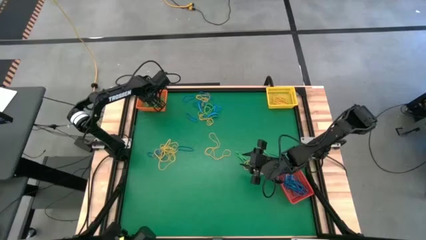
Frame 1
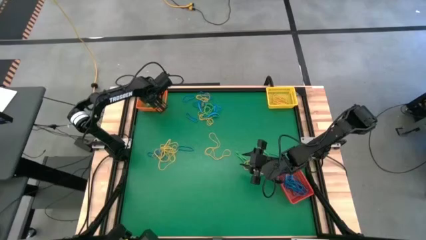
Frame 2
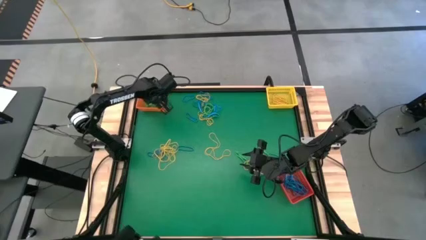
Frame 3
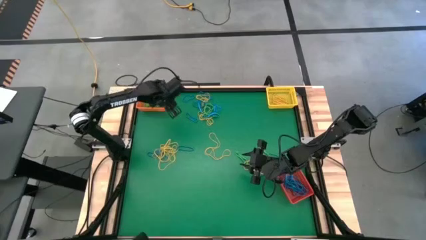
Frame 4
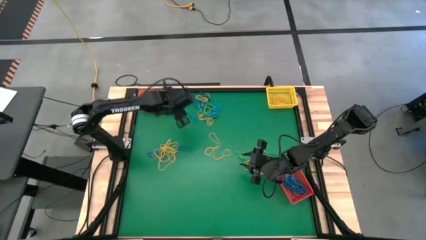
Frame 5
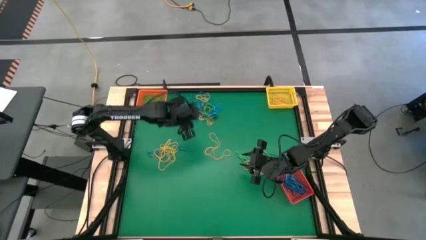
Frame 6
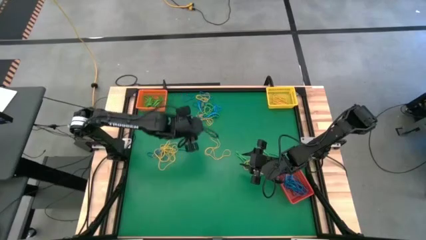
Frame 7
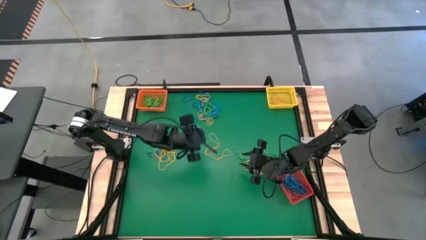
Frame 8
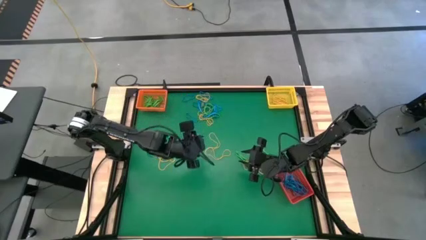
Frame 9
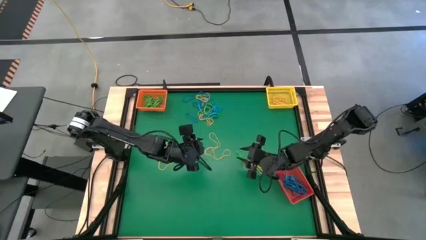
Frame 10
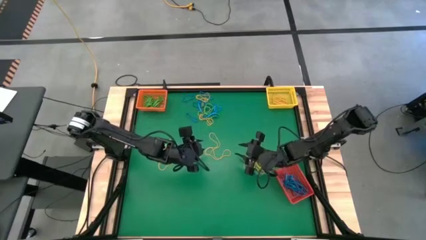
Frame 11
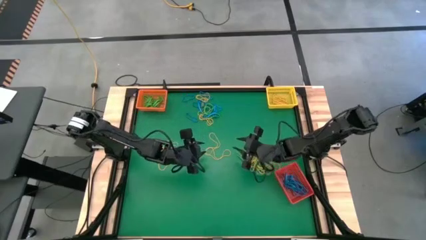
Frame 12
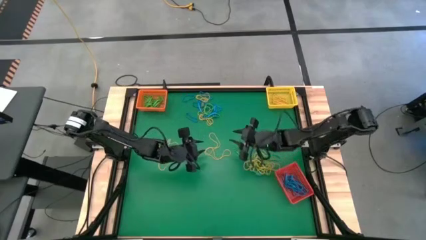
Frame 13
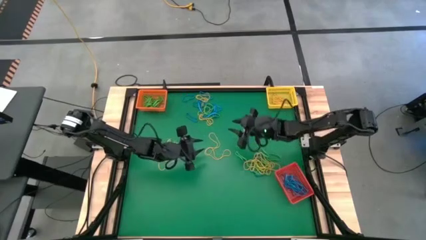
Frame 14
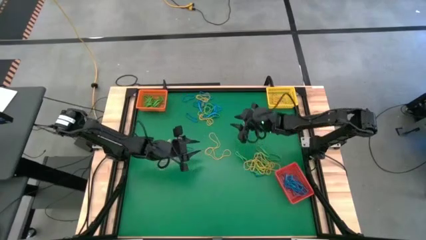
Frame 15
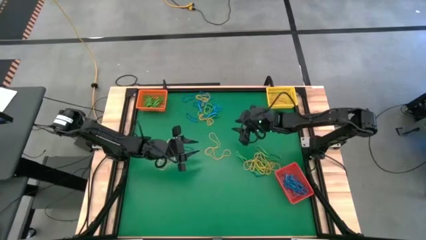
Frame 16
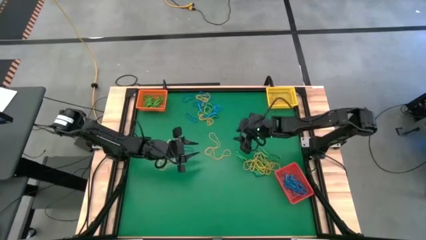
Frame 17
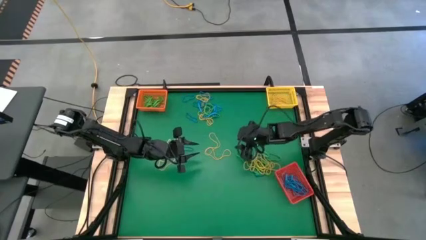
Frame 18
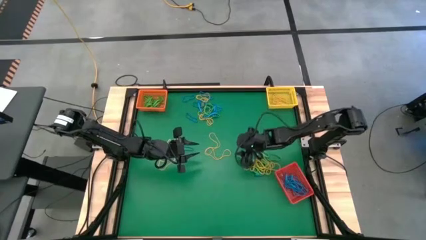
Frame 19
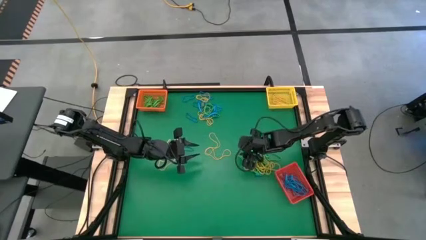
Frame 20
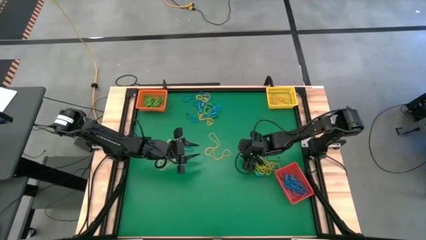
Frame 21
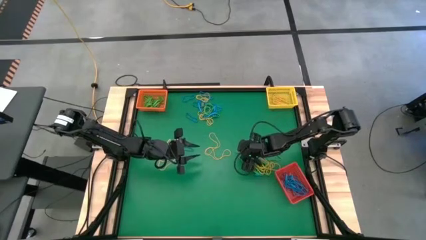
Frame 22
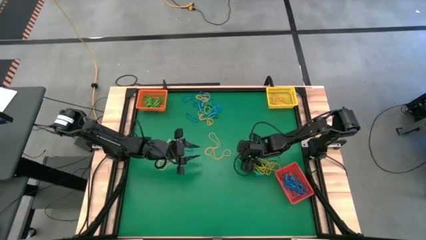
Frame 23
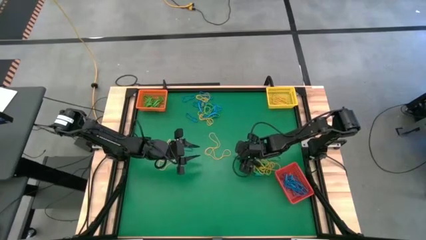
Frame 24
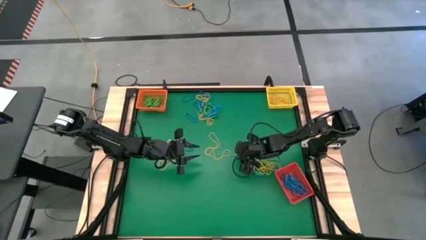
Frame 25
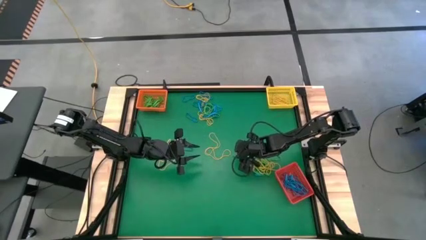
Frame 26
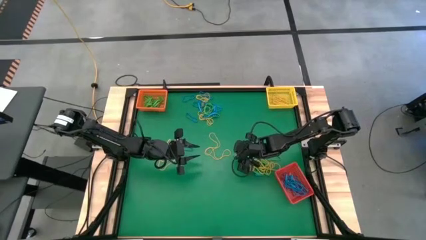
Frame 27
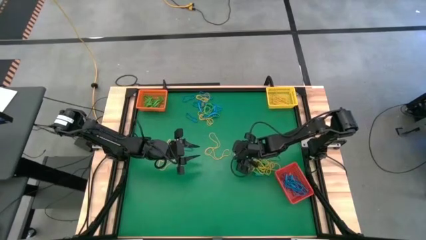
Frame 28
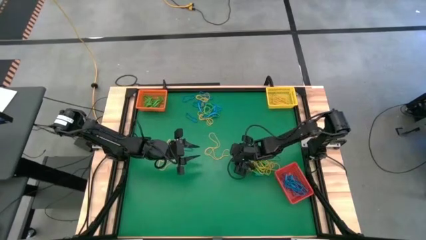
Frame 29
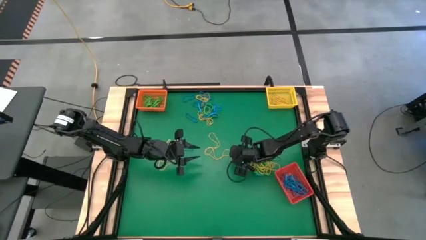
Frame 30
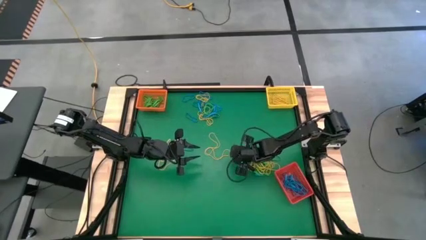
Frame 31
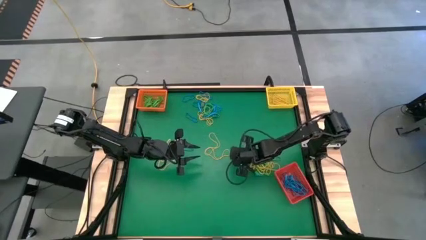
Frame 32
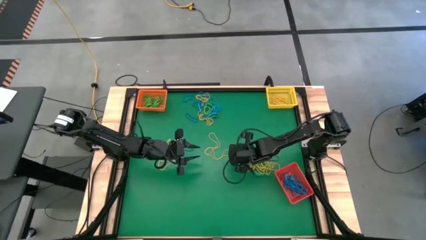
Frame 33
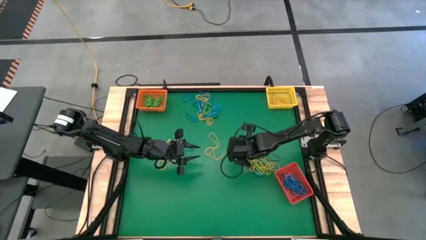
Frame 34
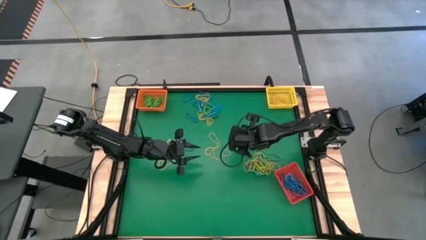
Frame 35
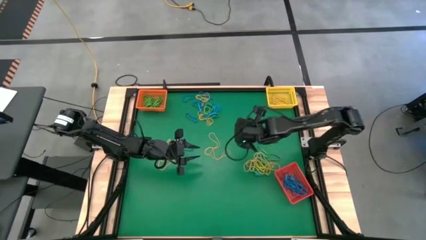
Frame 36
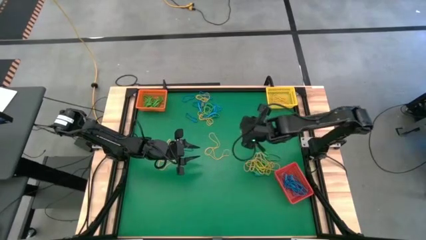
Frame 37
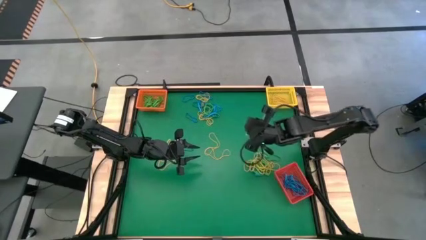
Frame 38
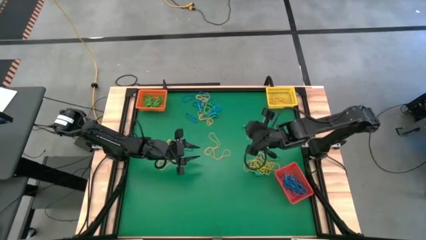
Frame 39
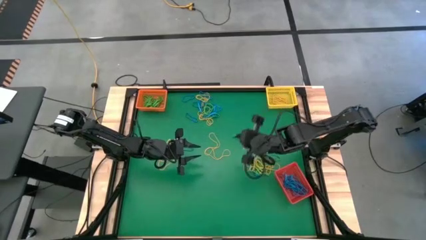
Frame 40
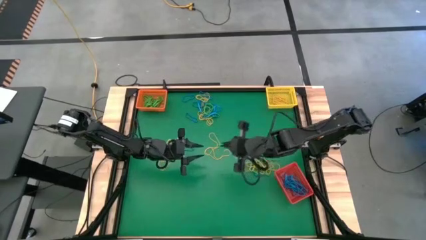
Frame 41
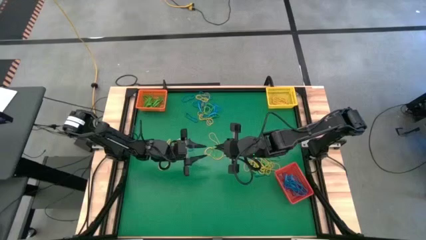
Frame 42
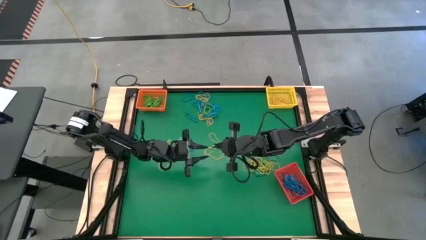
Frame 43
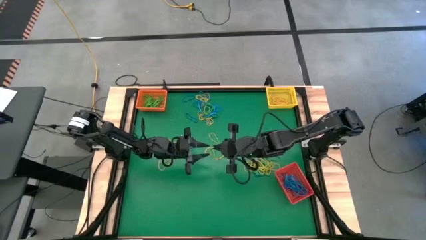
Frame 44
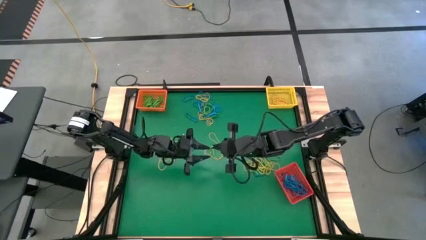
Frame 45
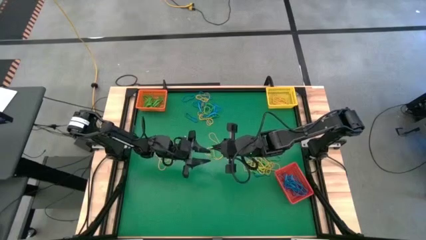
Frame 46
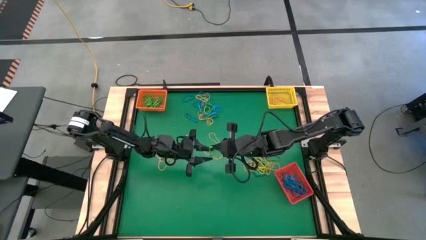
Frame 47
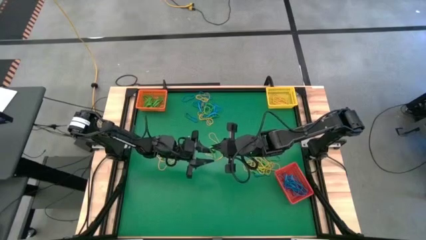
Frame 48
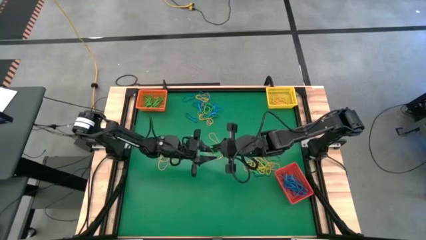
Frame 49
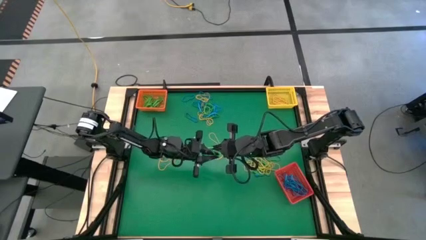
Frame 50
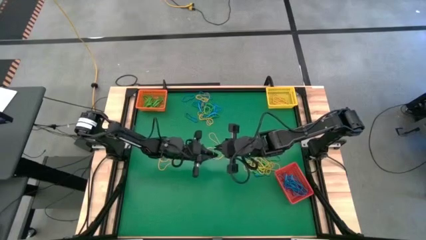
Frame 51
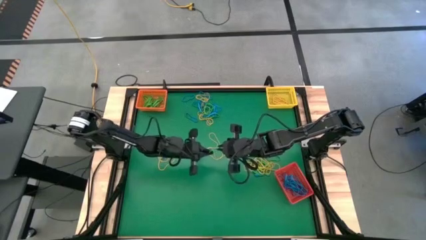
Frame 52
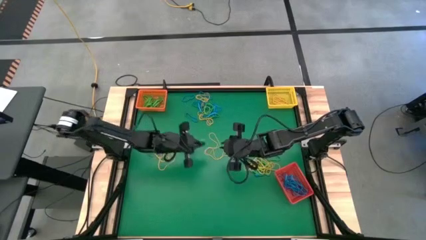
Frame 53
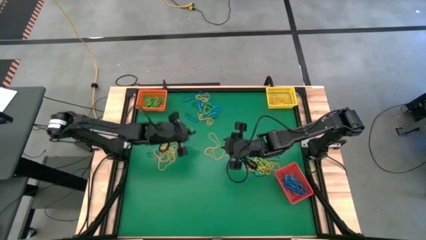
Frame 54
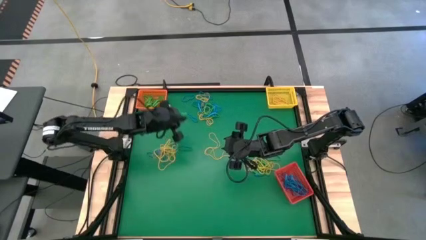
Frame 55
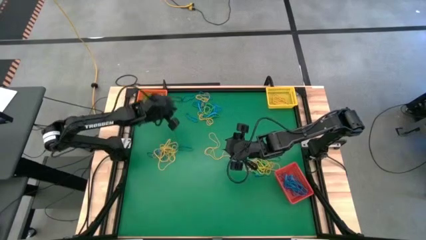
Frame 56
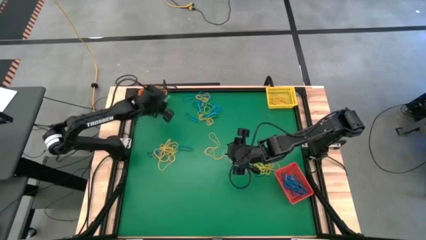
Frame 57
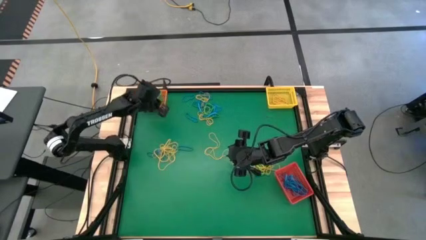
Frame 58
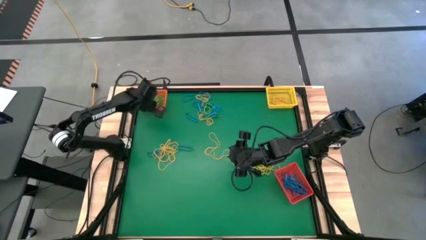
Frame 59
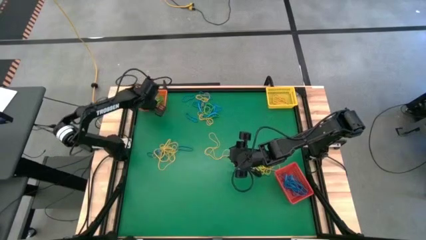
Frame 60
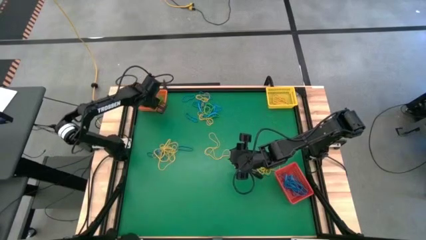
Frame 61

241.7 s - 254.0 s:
Task: Sort rubber bands into baskets
Put the green rubber band into the orange bin

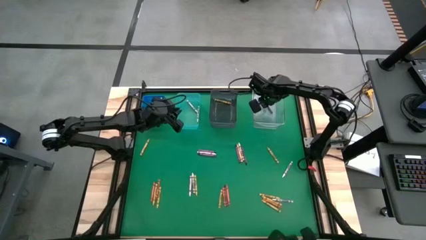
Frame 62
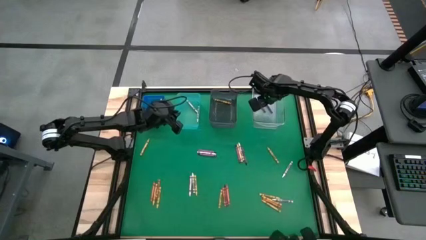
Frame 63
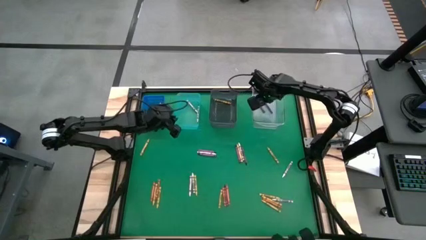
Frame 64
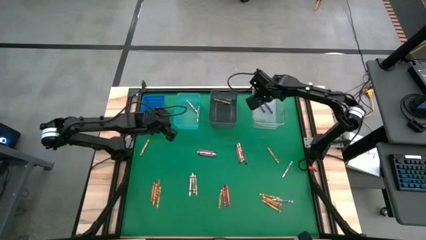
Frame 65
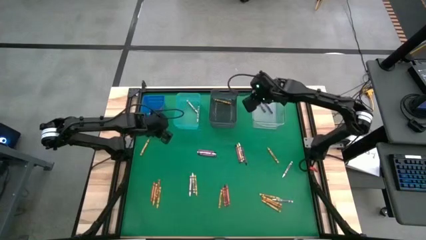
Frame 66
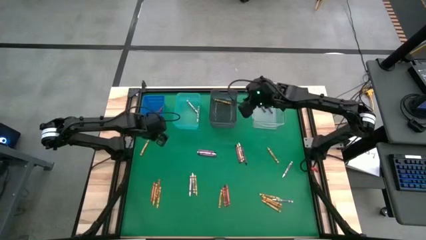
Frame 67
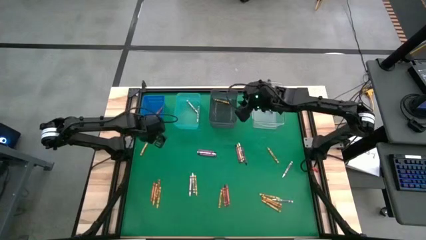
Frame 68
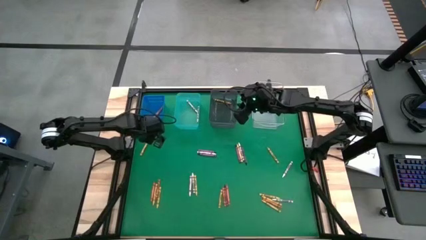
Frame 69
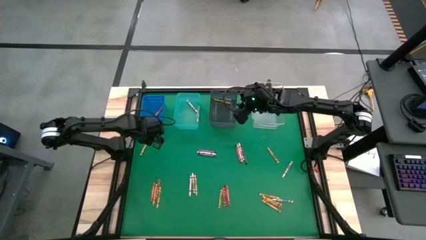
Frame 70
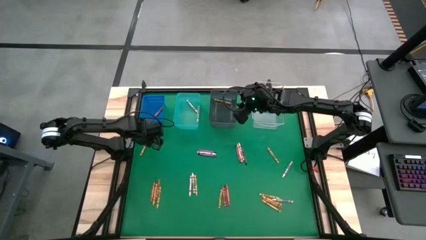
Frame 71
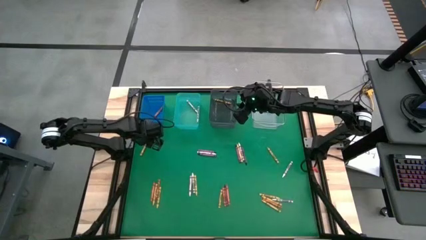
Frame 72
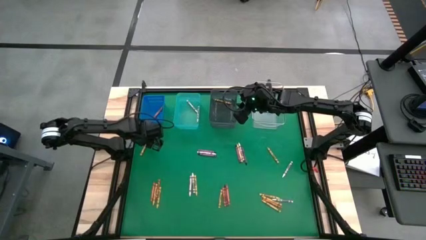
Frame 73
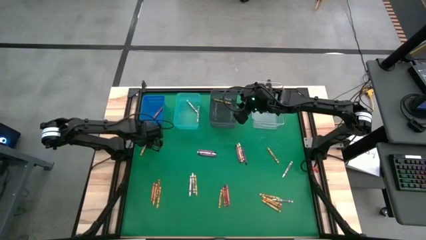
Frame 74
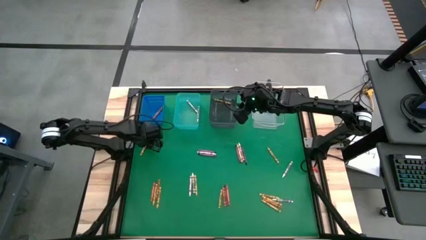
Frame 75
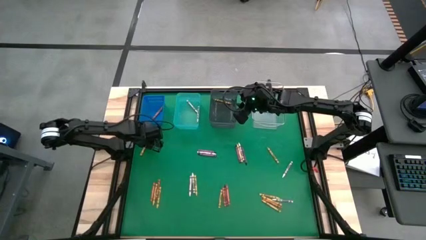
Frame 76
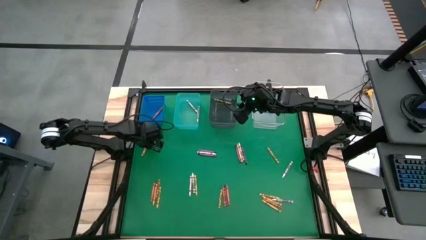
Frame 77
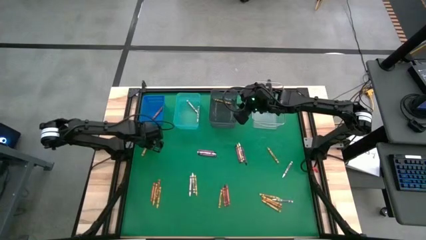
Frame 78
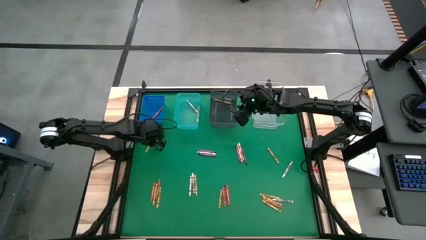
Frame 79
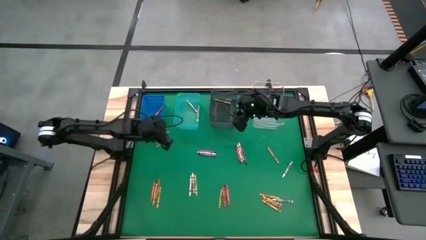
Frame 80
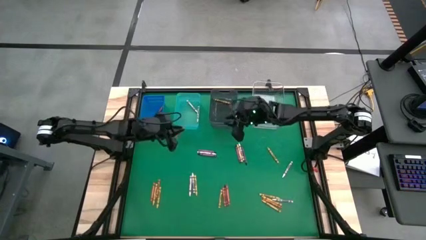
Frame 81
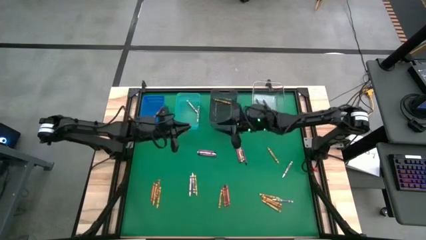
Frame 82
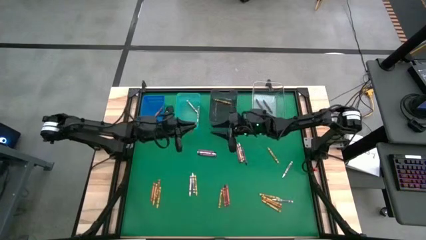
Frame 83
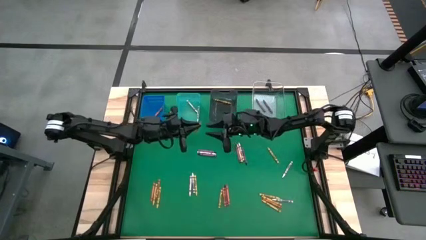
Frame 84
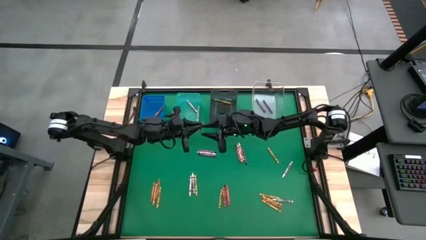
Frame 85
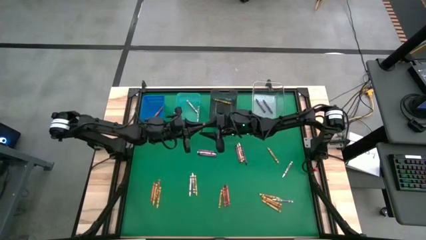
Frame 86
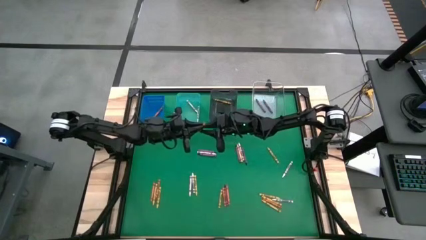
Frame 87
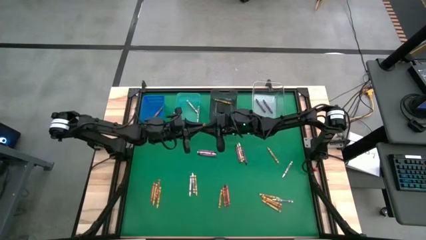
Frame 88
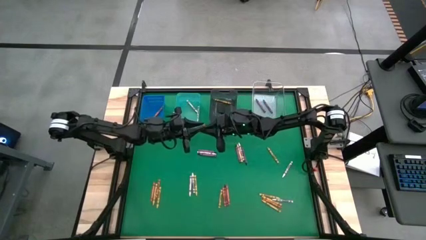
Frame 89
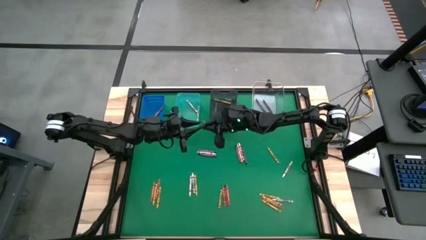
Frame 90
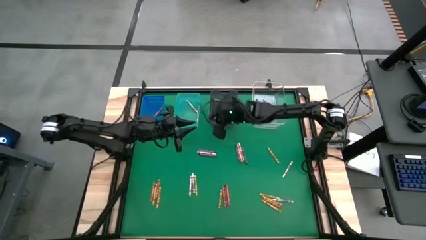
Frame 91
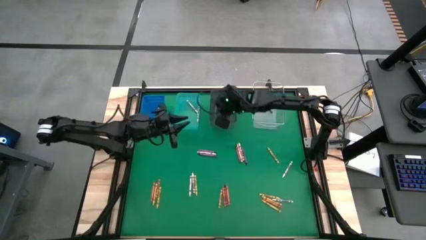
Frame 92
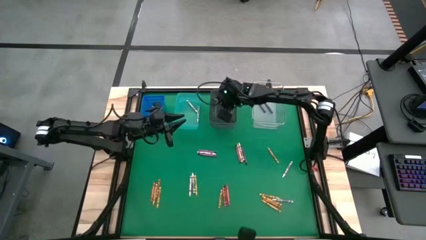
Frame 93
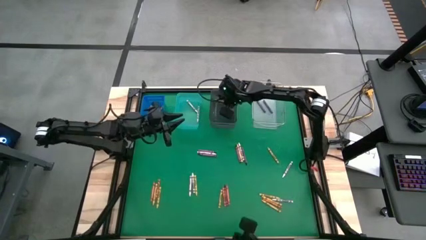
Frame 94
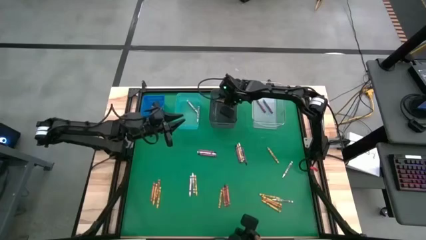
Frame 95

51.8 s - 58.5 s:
Task: Sort crayons
Put the yellow crayon into the black bin
